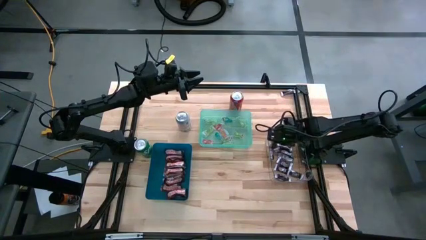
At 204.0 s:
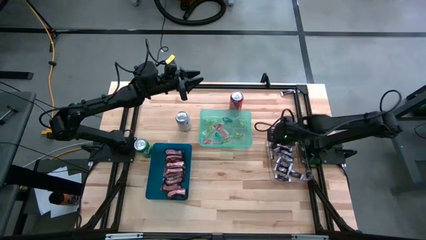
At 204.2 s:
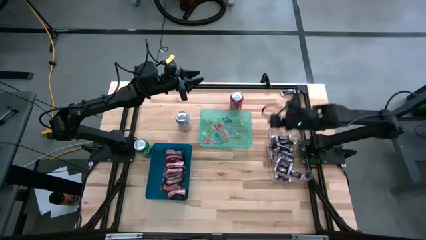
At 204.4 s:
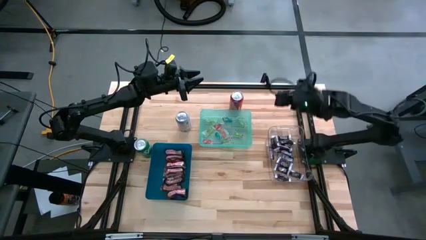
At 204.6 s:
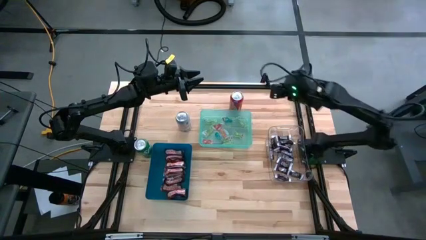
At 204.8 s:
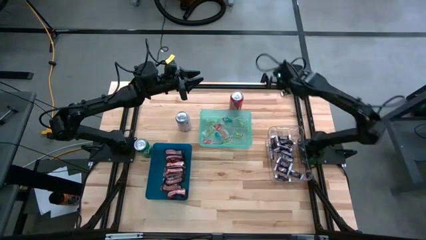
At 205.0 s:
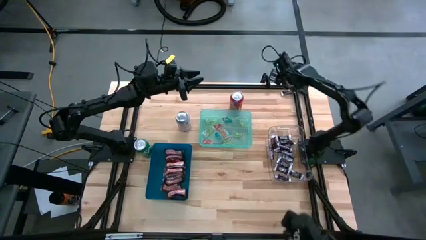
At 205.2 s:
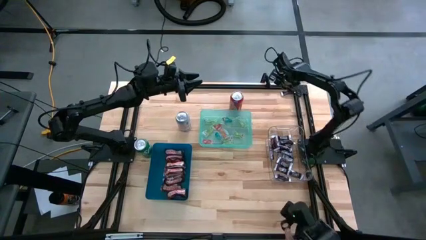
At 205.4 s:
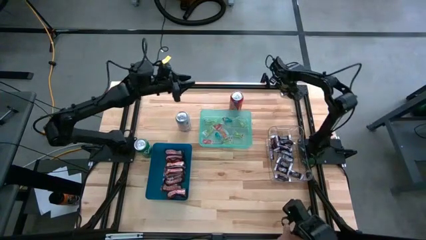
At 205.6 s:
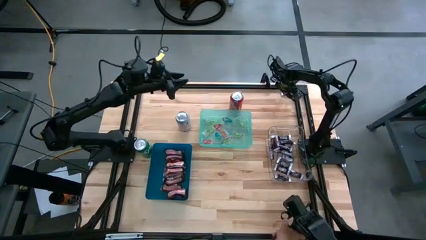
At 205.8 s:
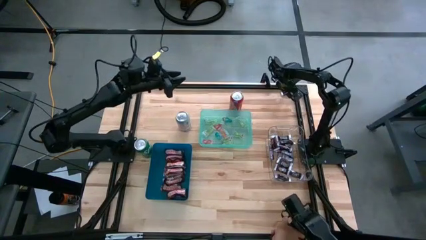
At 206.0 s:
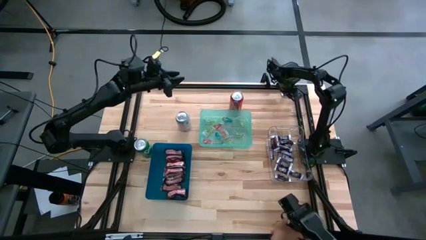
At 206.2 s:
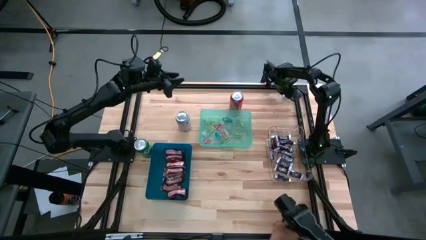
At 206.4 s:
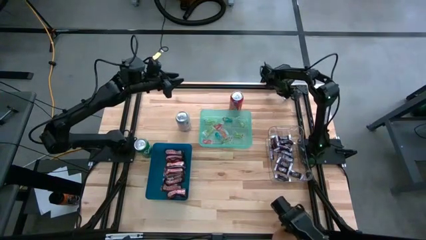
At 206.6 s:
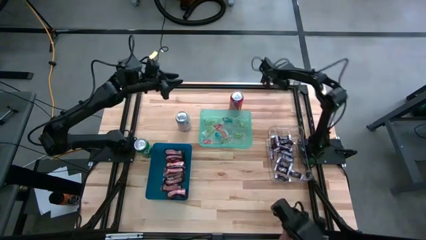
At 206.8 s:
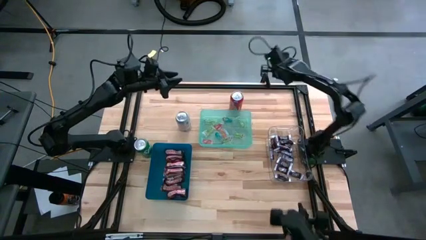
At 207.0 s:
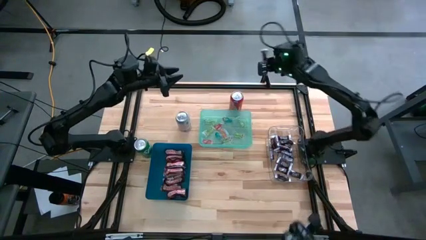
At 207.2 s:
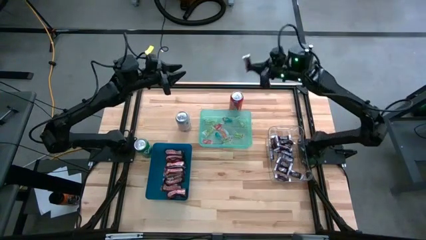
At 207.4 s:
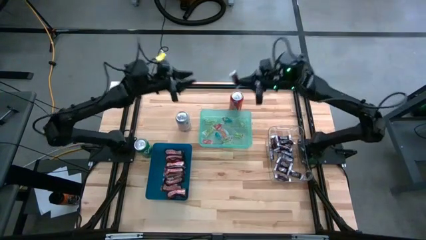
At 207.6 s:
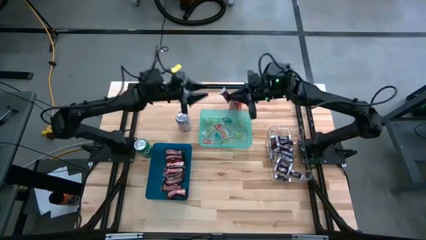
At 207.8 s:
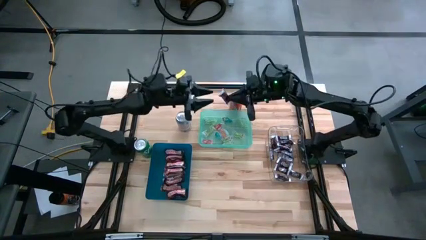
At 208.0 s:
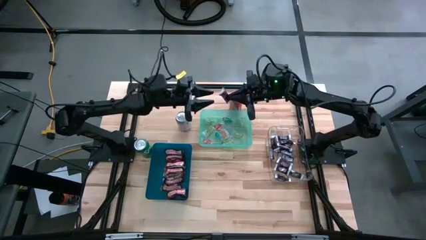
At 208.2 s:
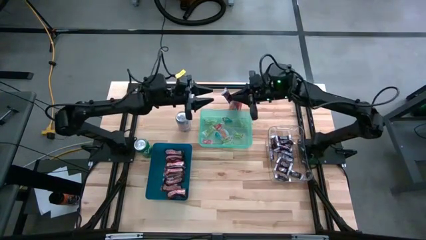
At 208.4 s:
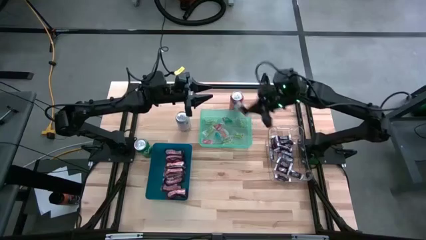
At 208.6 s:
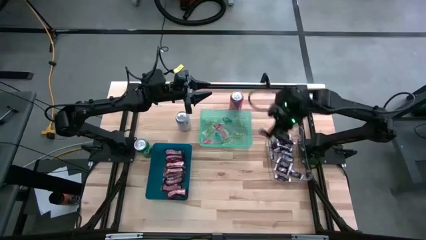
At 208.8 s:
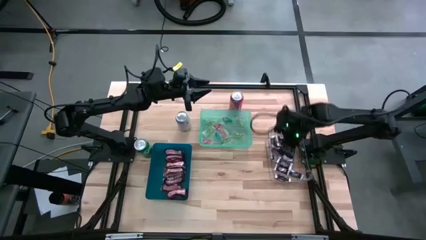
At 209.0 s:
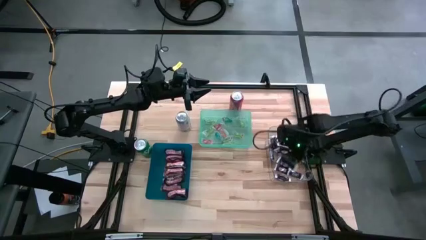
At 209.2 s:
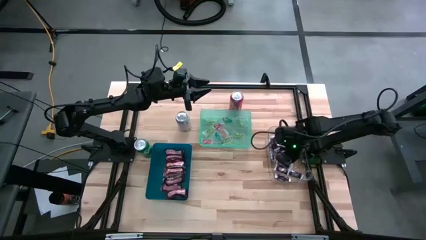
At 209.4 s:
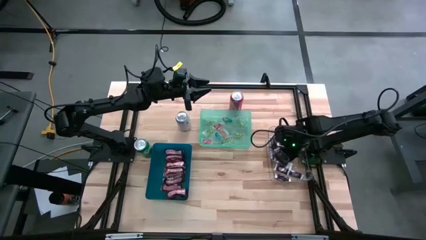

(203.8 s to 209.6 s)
Task: Organize candy in baskets
Put the white brown chocolate into the transparent bin

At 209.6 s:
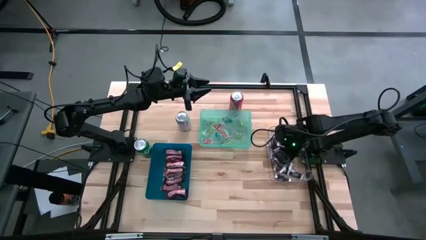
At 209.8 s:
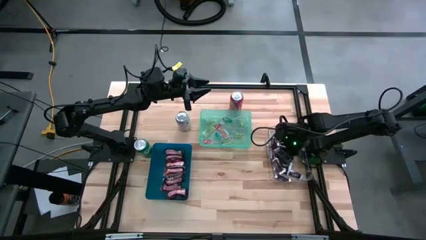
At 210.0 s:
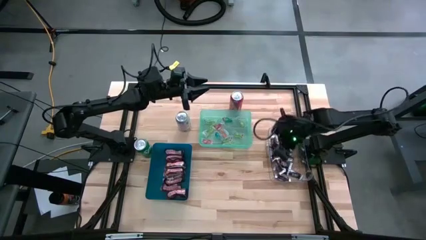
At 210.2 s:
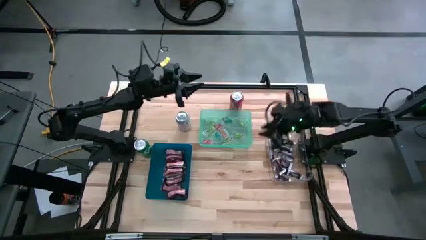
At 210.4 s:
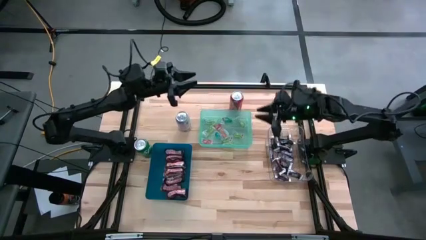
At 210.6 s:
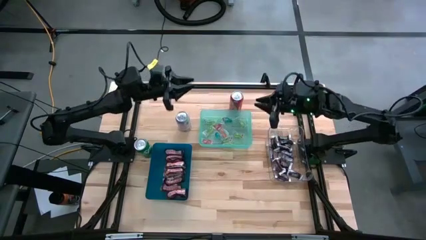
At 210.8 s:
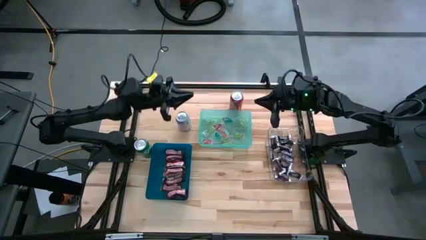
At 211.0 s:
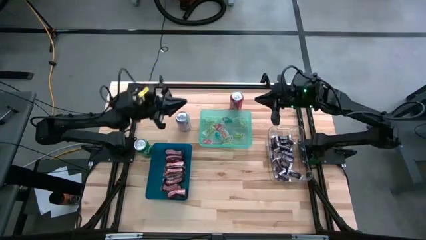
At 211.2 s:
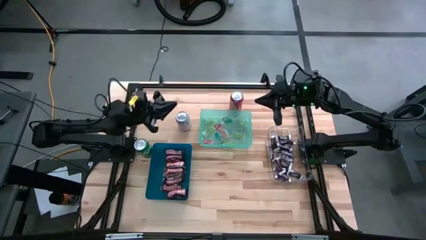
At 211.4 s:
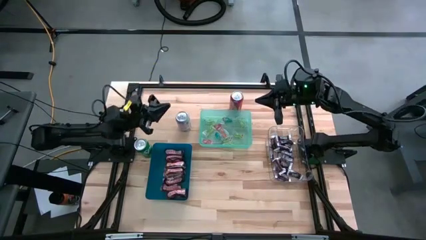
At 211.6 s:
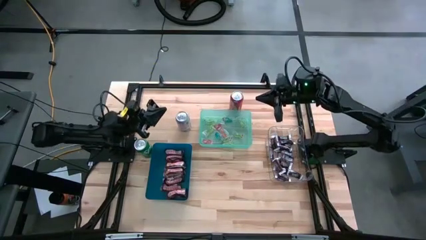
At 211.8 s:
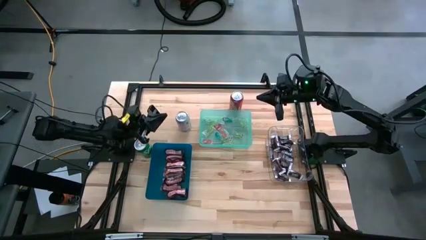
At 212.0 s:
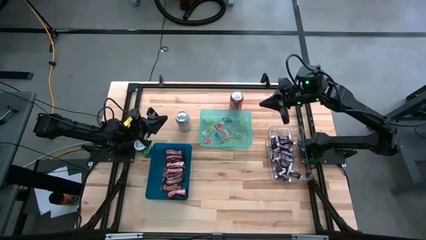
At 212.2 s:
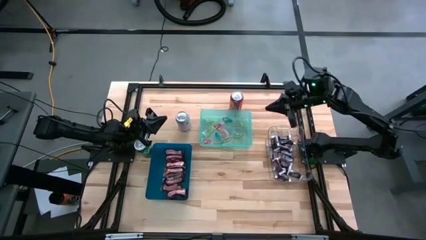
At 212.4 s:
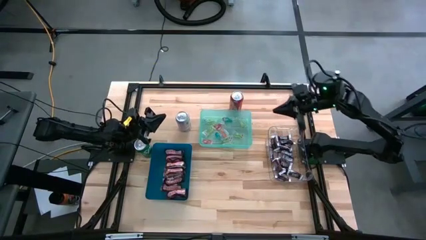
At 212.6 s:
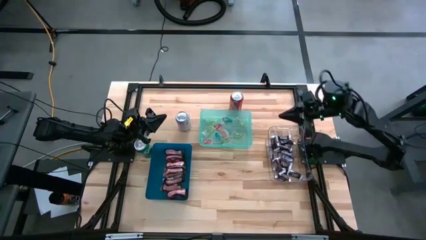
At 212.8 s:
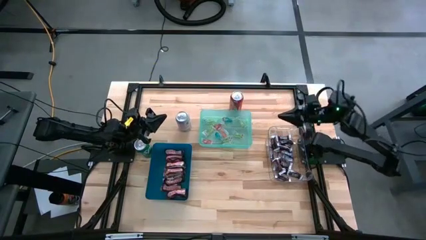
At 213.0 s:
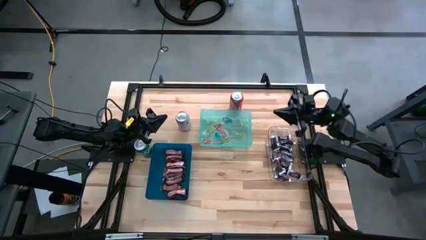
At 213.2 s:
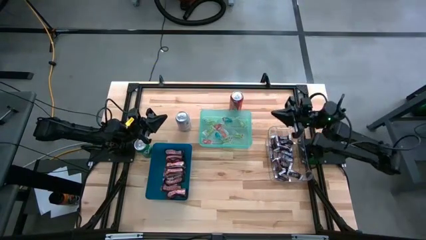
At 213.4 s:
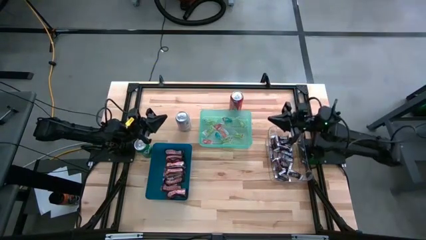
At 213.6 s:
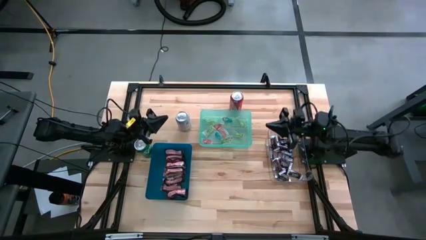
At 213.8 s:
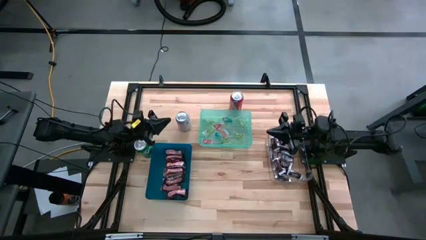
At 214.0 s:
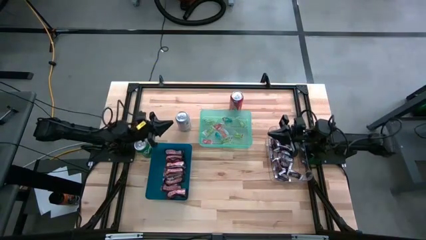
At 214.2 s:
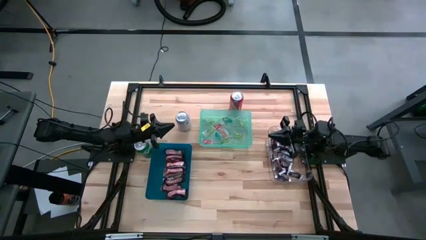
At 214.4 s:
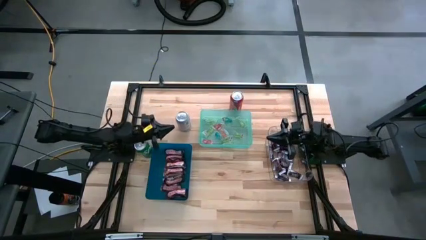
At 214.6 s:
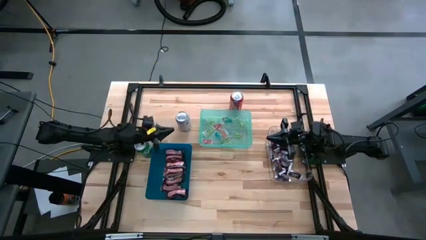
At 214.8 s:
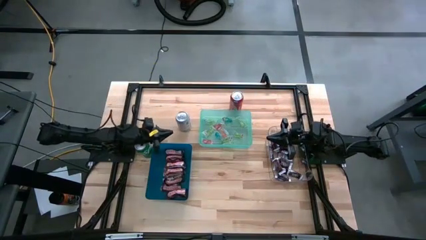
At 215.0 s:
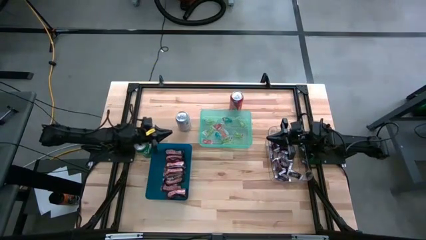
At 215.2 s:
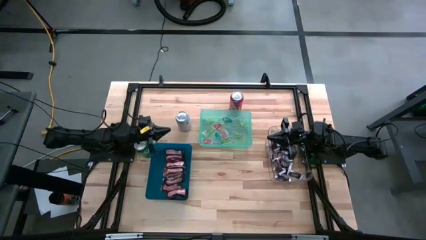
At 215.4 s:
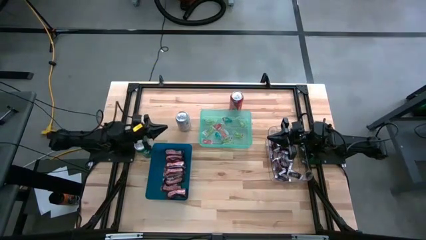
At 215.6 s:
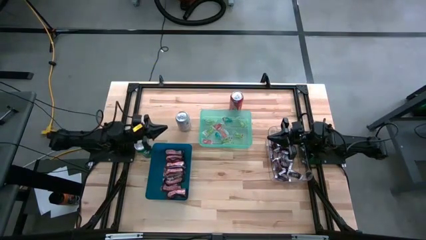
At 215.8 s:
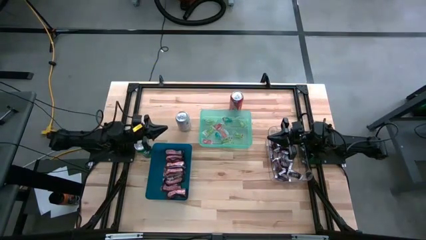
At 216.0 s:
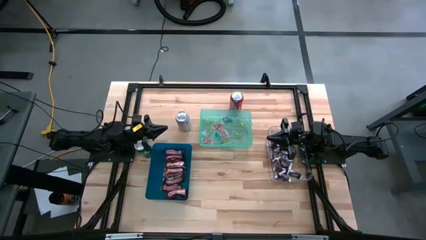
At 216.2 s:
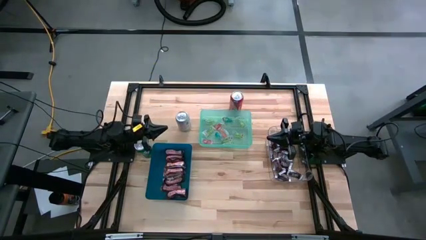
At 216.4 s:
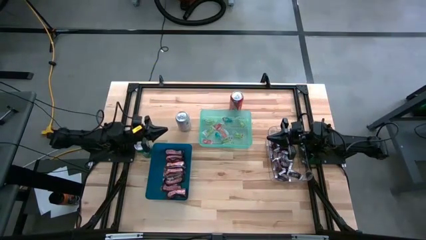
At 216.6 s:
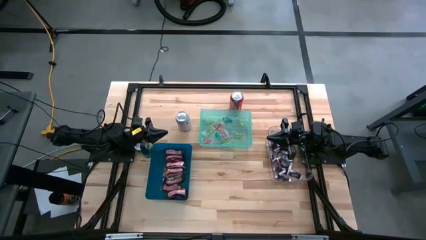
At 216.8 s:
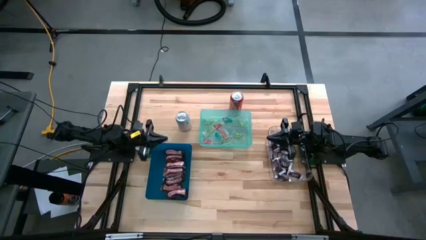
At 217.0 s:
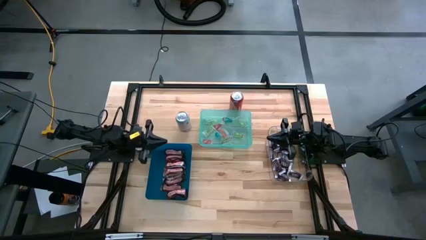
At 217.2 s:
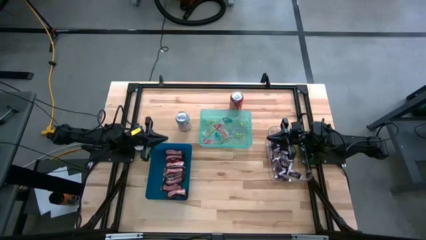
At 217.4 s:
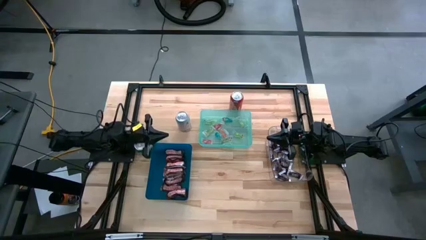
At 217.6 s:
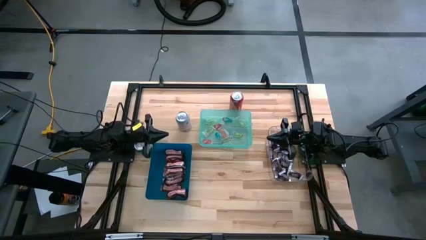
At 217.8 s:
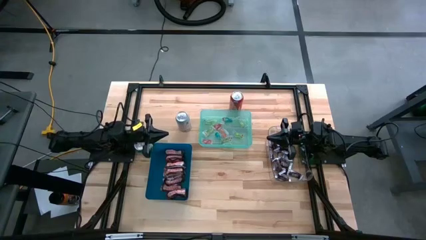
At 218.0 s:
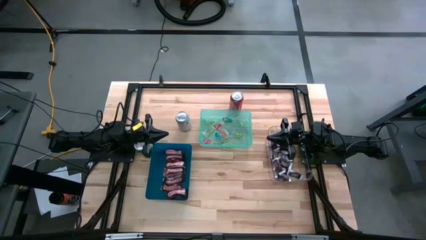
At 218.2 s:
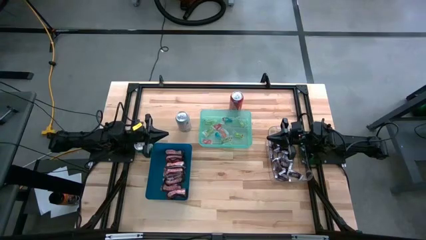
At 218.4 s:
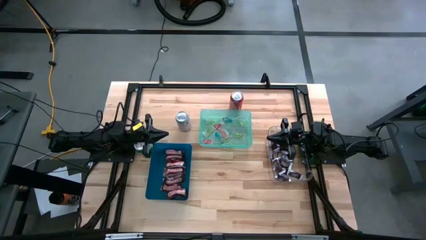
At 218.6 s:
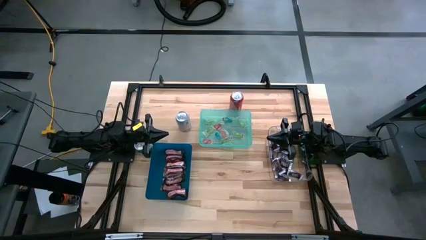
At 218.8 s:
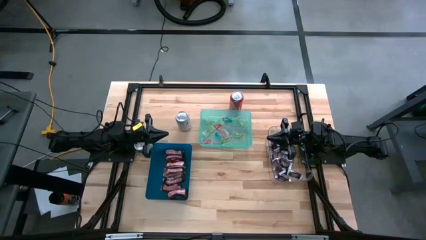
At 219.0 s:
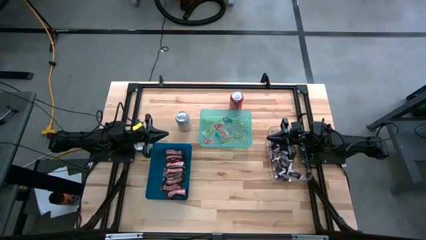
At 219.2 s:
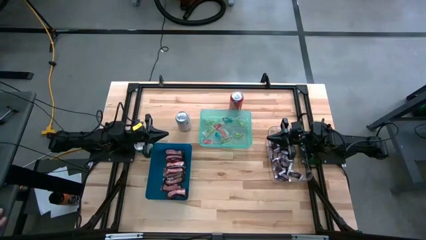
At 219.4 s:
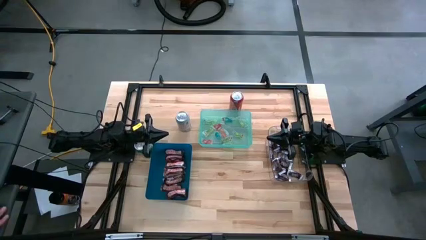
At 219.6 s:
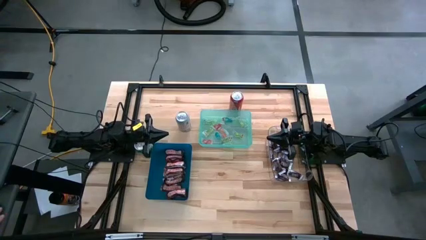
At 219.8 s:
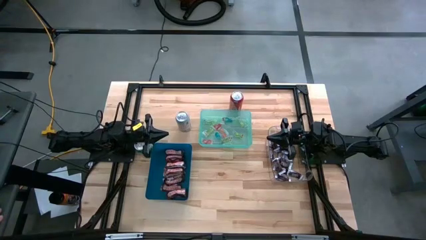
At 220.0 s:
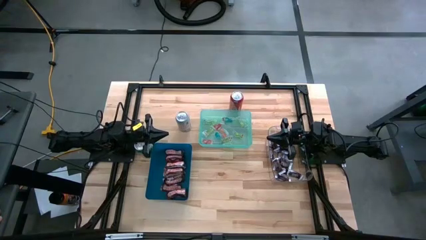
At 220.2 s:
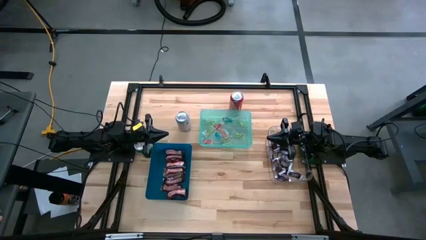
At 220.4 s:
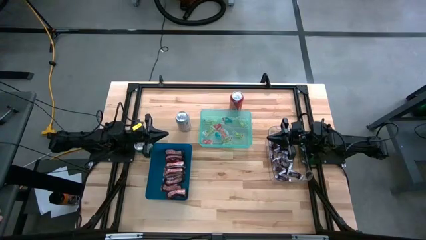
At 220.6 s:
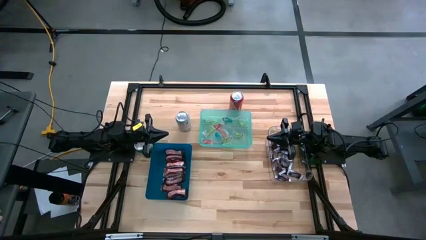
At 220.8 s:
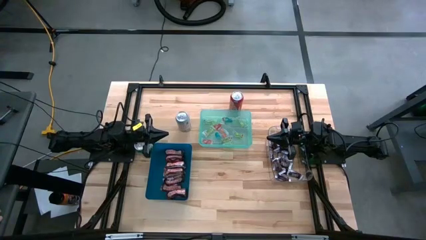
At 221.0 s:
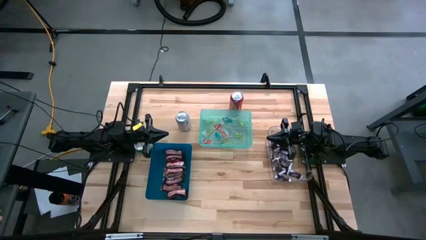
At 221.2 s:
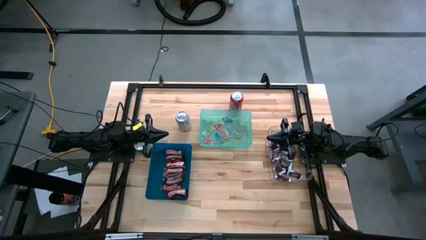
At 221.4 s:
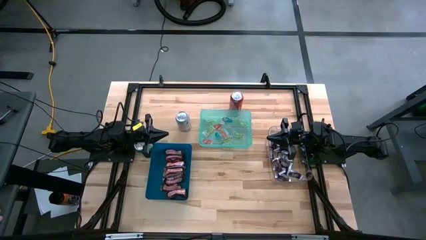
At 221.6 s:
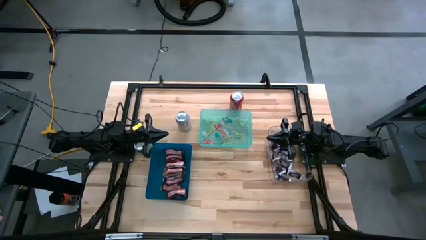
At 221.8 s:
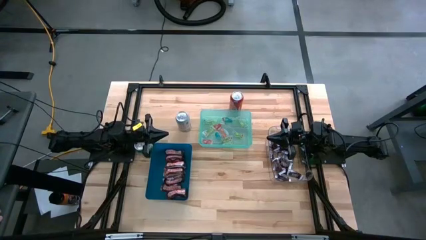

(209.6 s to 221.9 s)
Return to Home Position
